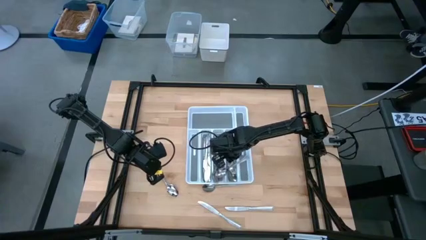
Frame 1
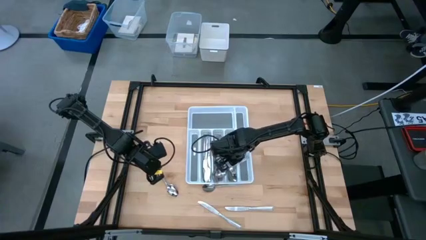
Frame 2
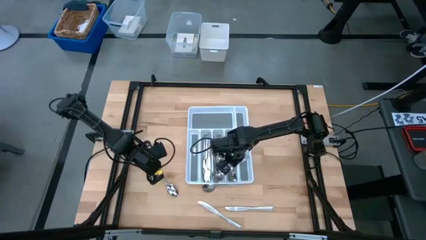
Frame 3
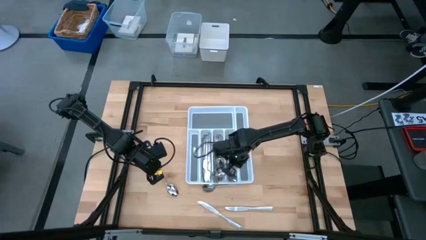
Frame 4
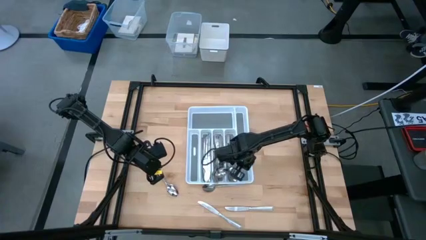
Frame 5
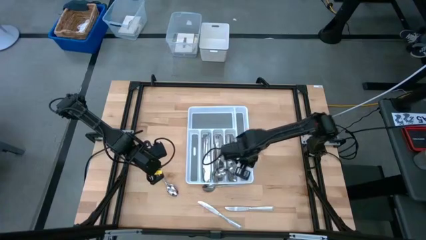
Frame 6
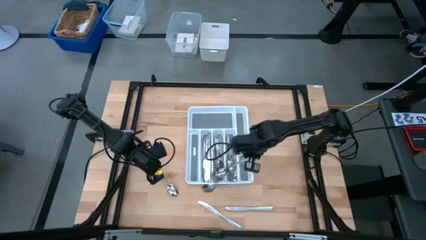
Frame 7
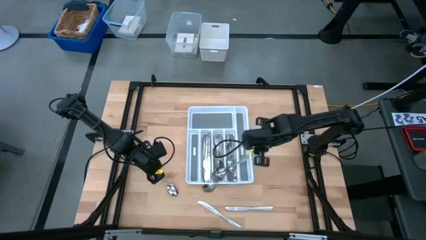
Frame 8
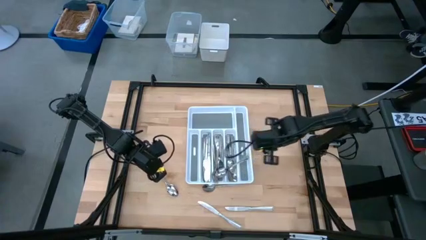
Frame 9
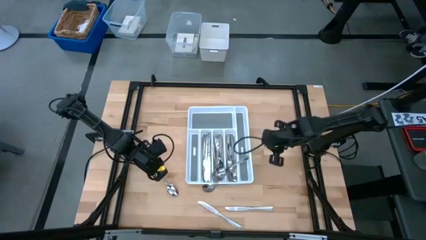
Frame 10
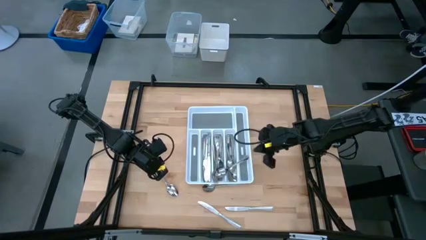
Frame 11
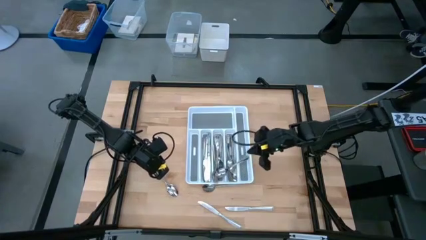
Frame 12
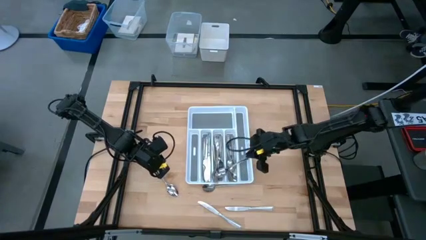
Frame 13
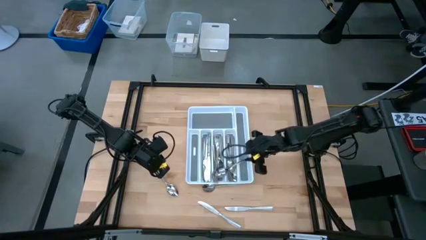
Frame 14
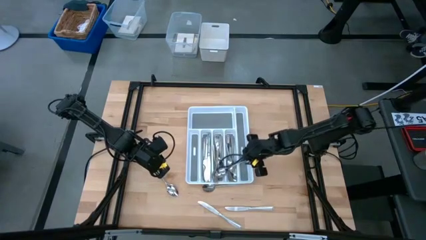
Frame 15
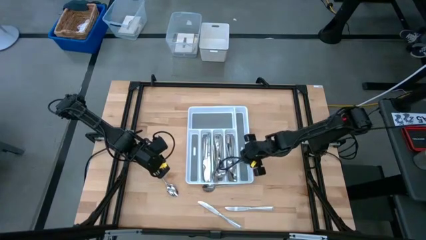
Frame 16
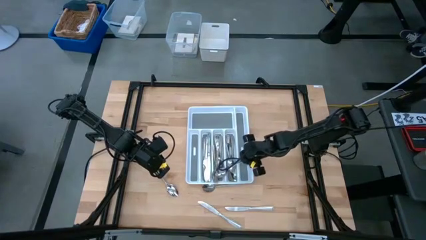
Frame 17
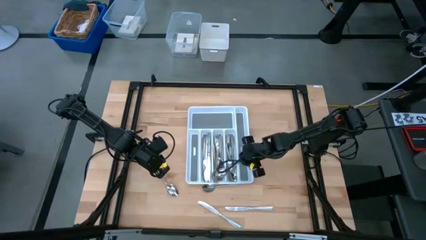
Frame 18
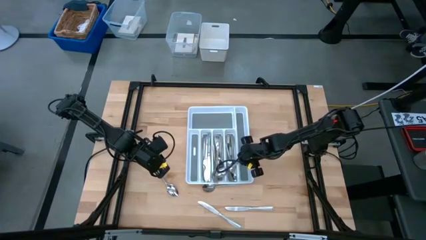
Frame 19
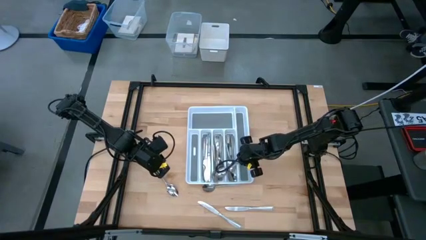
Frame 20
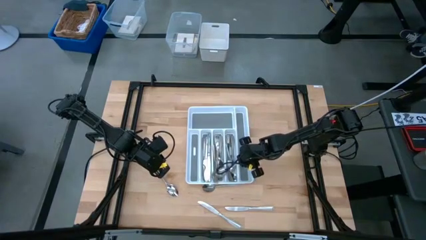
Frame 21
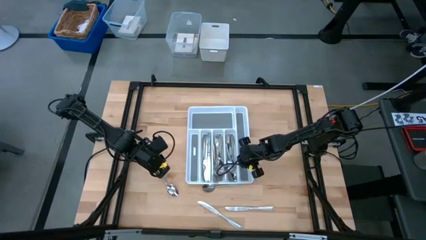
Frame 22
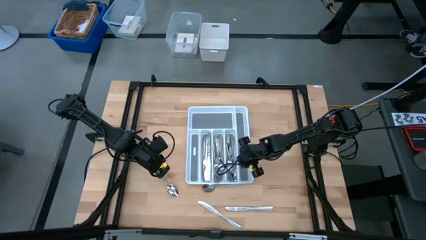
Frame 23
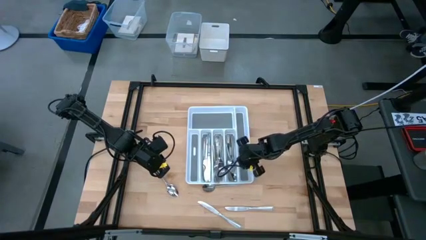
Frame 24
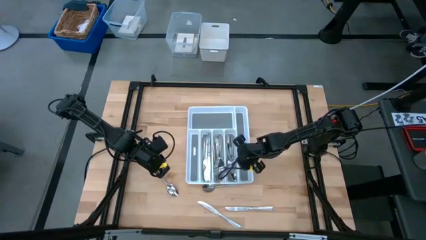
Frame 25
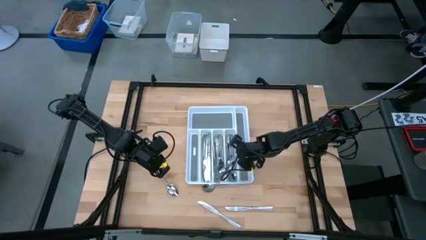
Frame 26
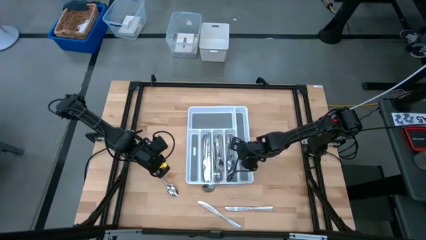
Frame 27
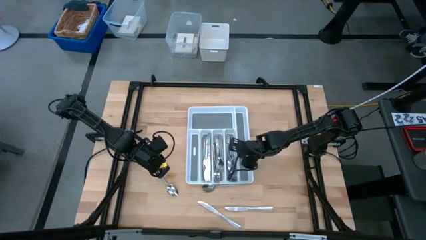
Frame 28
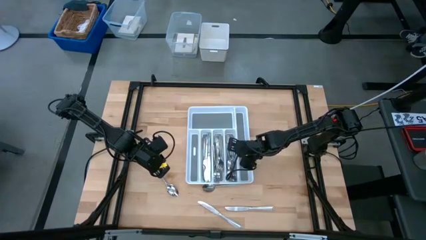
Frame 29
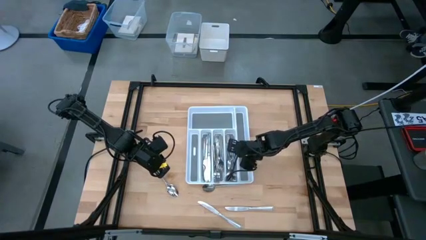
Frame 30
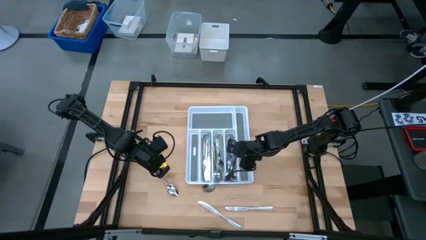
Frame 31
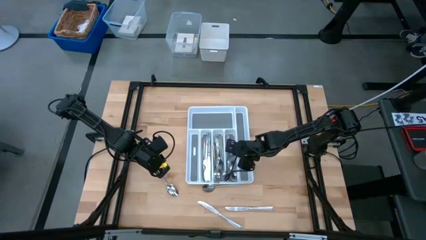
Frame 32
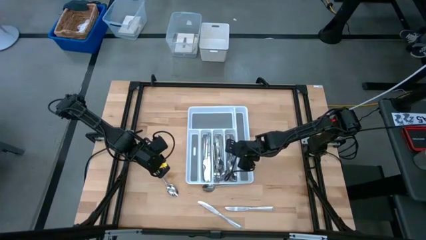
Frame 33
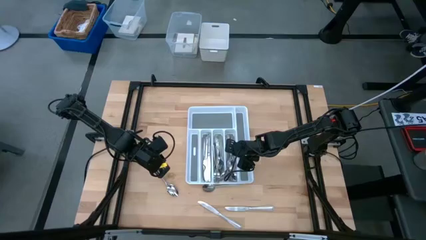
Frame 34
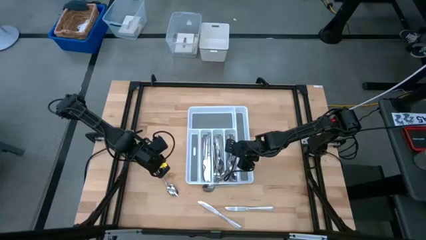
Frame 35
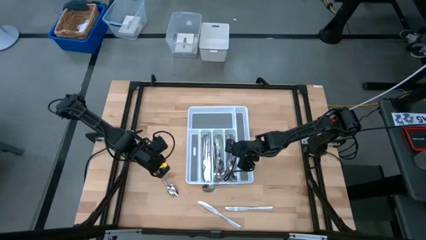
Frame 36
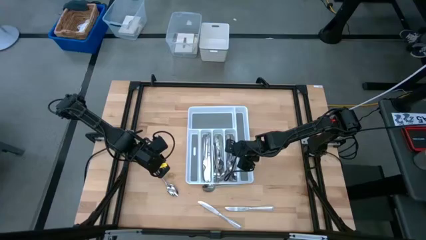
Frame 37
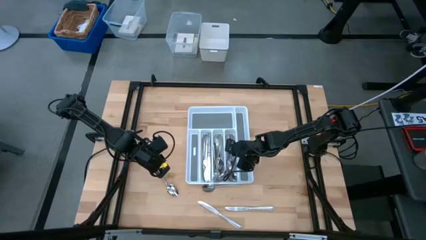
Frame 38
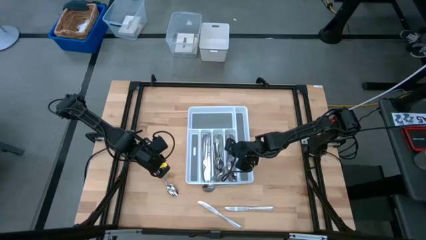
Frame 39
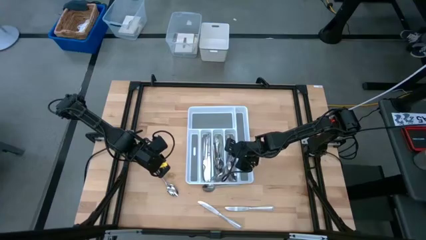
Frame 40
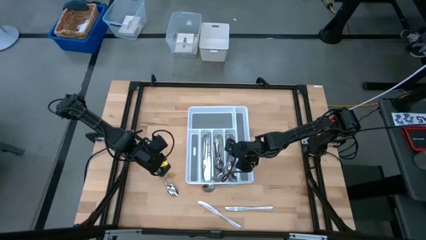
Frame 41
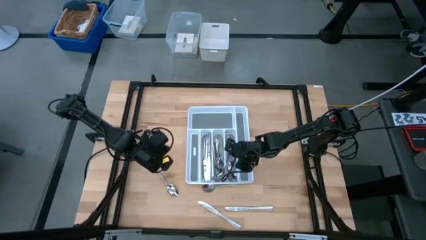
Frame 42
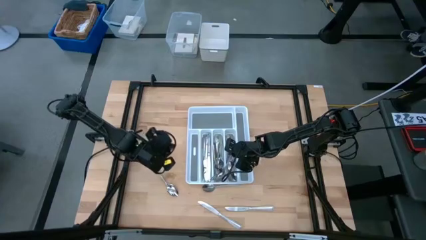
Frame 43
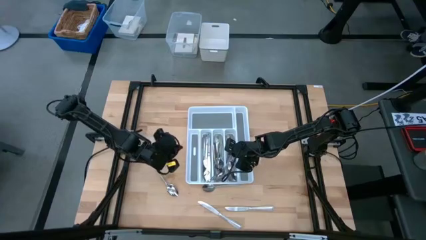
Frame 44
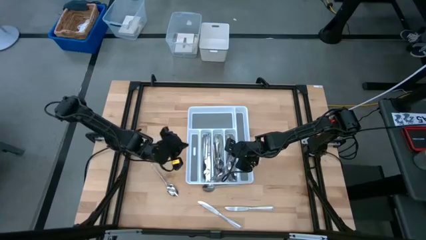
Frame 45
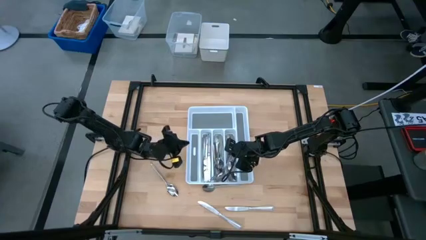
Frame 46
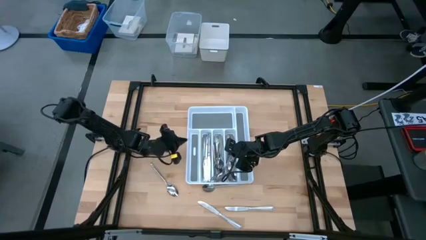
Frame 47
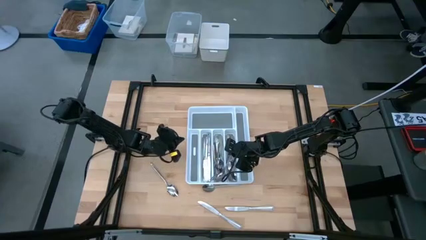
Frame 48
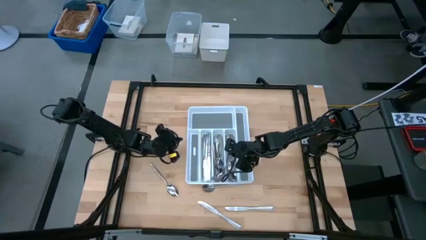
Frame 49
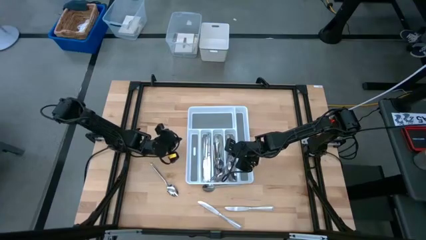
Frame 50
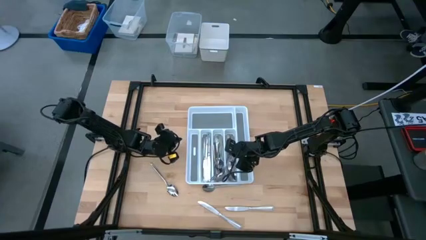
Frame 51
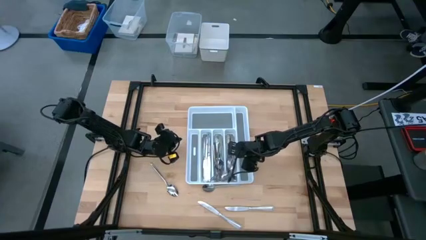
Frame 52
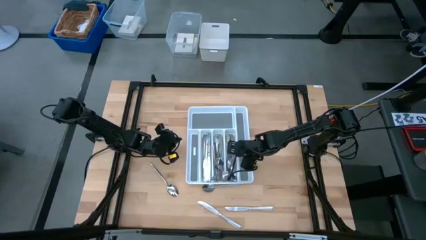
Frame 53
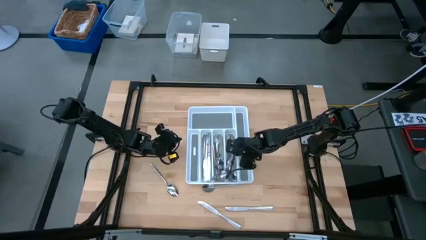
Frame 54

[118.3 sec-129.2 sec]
Task: Sort silverware
Put the silver spoon into the white cutlery tray

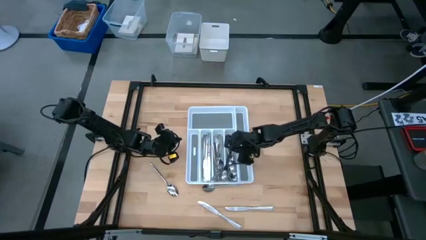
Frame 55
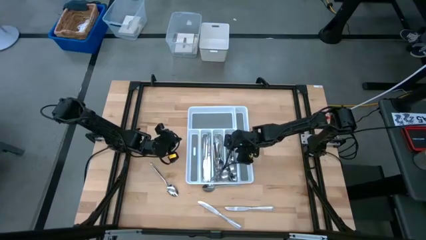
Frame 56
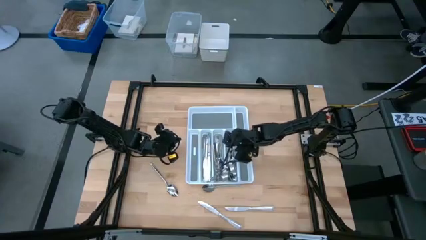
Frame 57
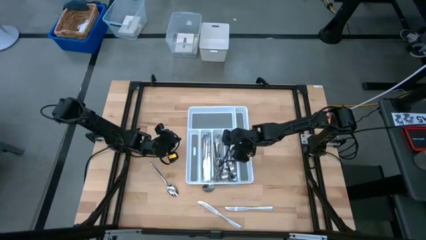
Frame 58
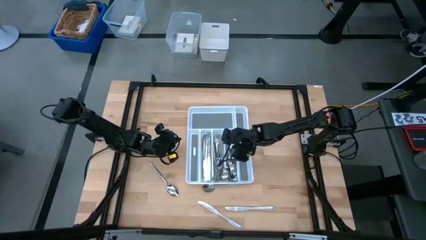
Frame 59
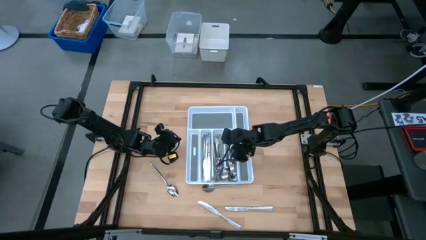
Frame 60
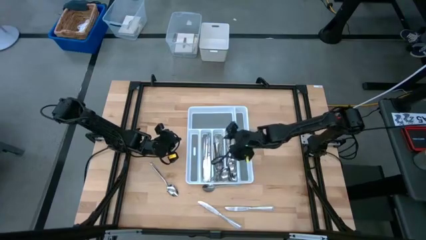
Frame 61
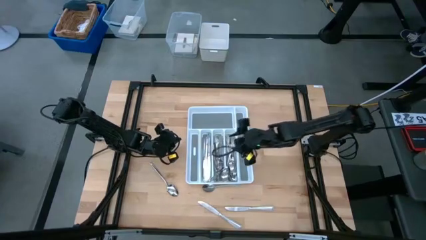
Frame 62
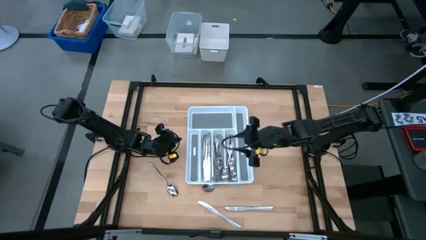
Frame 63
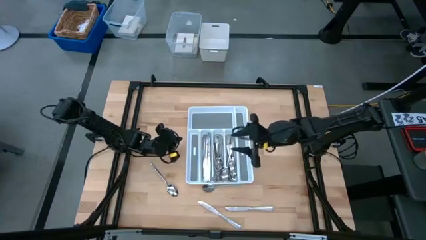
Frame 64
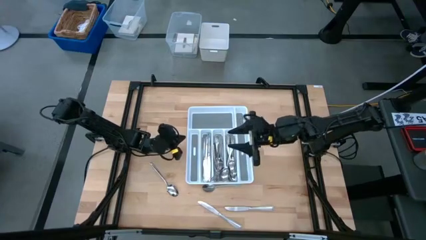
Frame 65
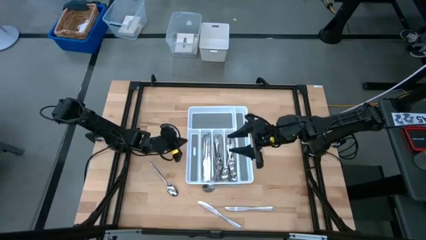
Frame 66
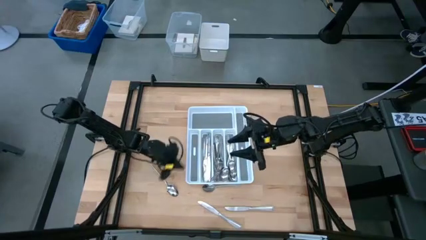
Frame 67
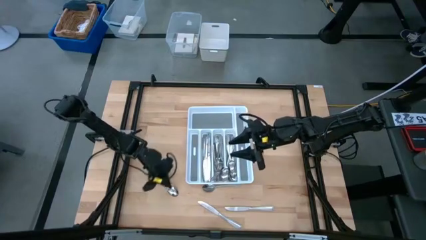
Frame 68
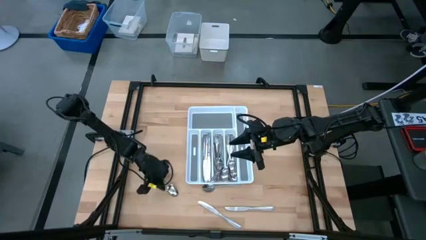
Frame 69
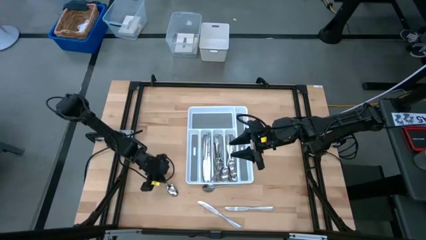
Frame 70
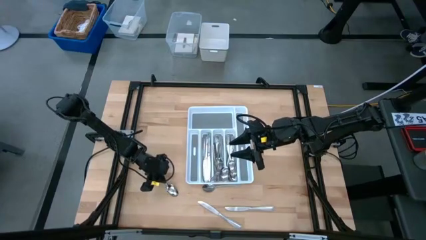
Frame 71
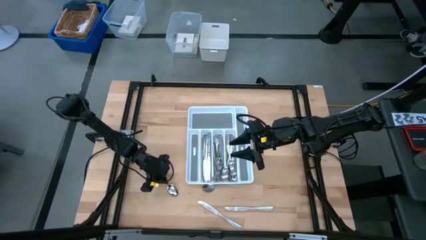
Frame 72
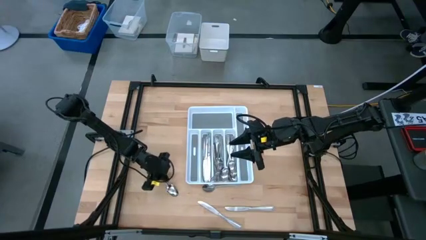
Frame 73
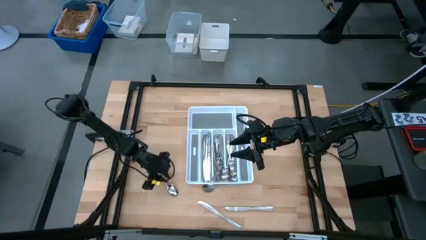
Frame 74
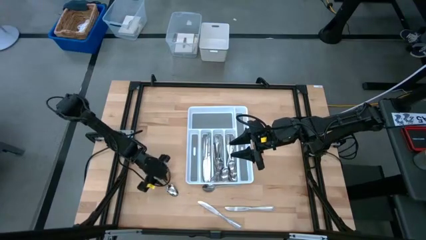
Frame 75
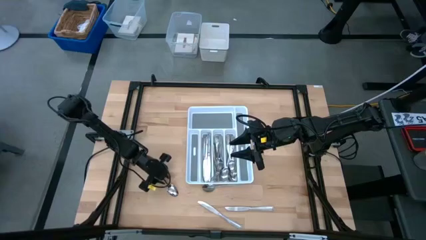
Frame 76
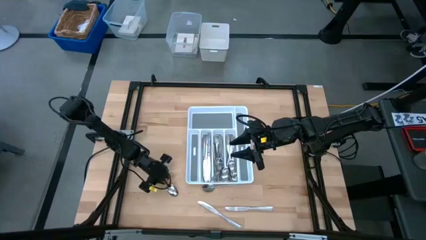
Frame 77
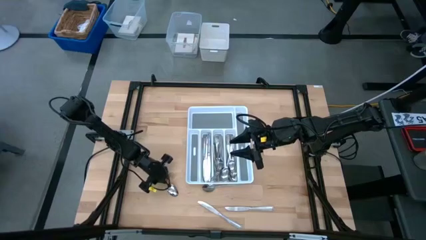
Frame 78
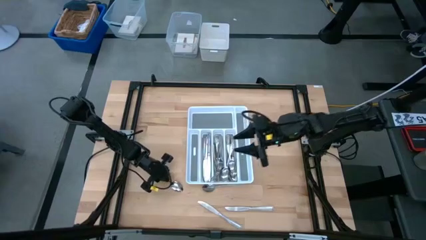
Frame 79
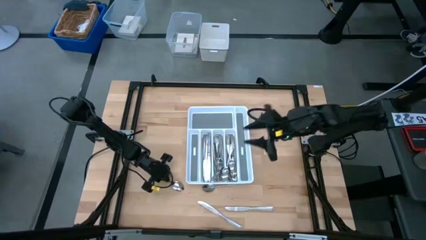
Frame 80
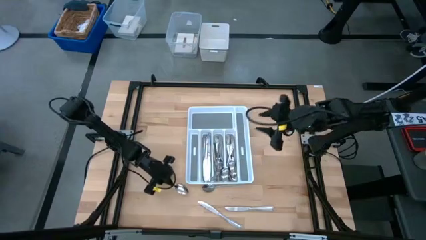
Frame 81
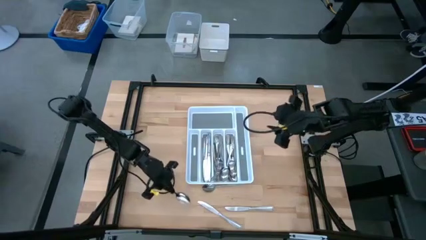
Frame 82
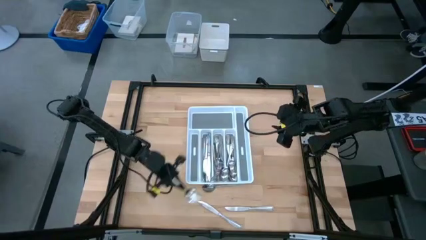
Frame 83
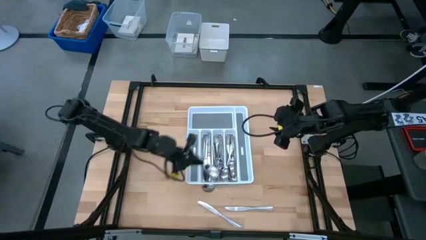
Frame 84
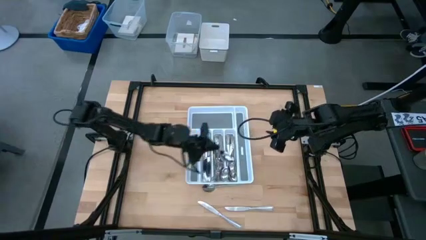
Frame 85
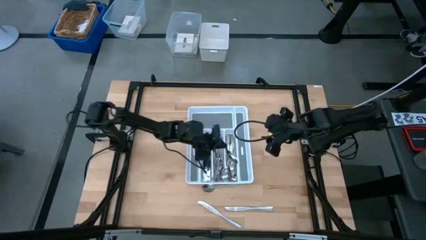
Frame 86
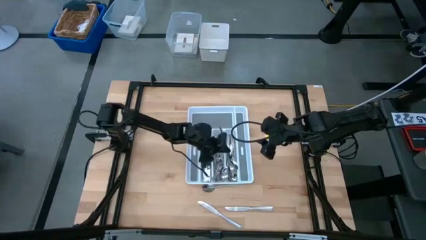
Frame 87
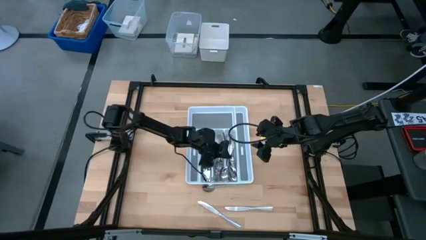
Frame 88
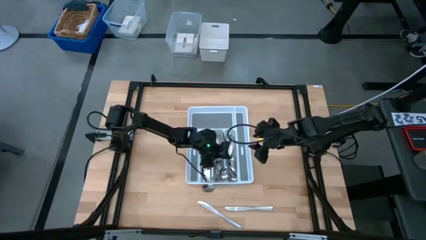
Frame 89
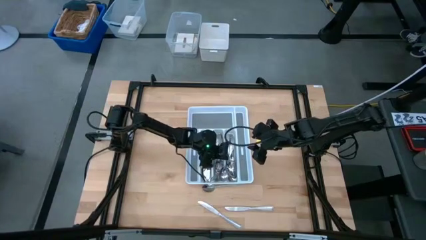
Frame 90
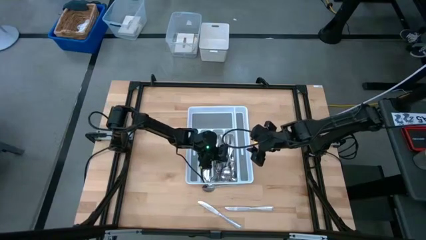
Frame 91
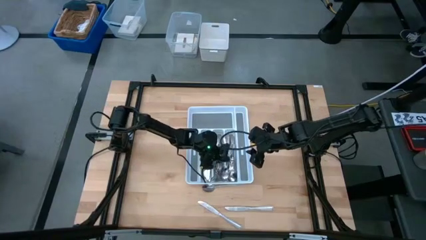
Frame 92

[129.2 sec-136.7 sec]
Put the silver spoon into the white cutlery tray
